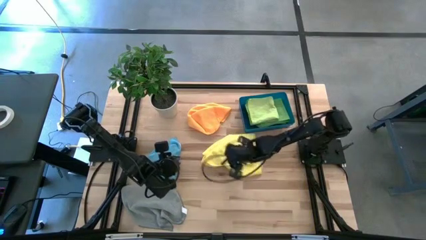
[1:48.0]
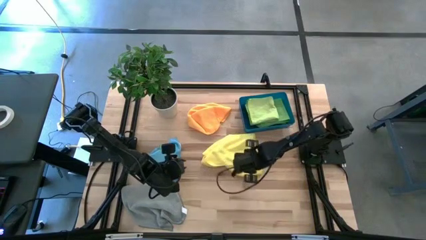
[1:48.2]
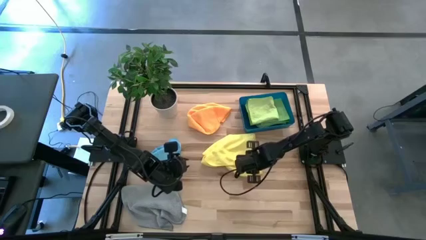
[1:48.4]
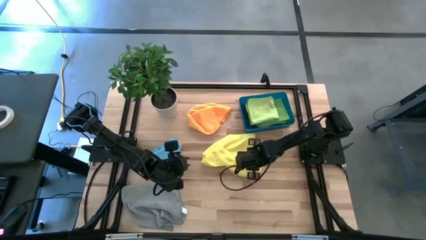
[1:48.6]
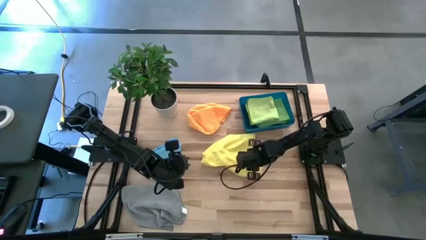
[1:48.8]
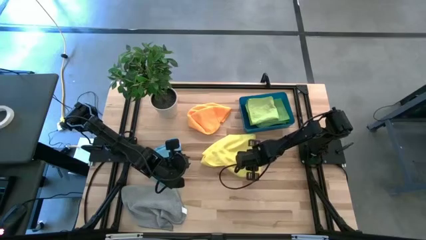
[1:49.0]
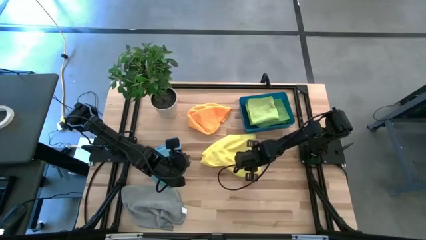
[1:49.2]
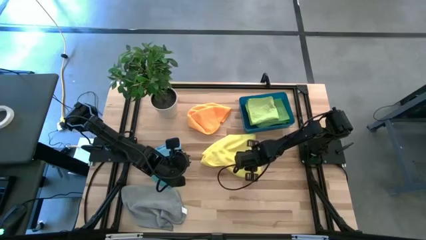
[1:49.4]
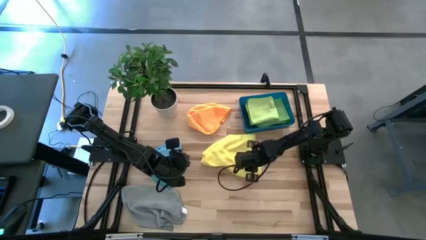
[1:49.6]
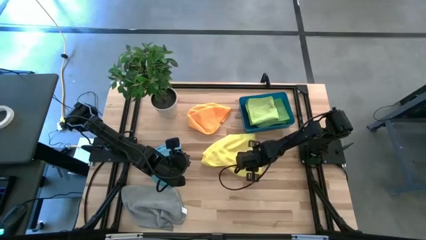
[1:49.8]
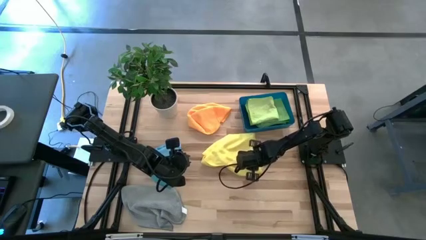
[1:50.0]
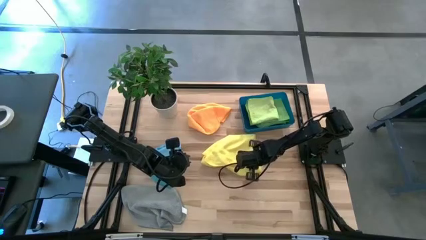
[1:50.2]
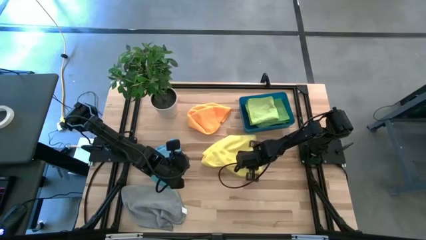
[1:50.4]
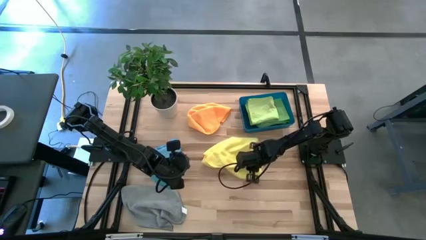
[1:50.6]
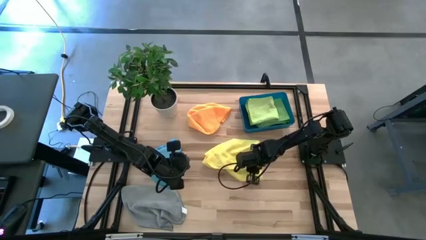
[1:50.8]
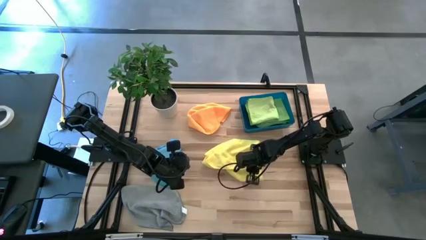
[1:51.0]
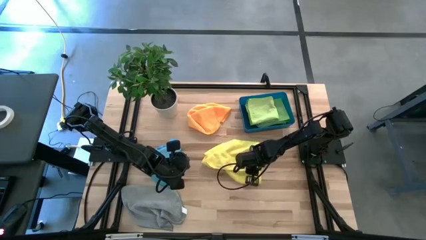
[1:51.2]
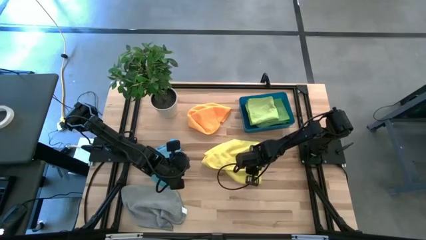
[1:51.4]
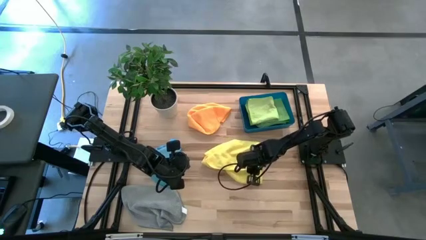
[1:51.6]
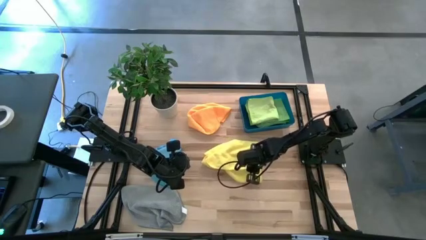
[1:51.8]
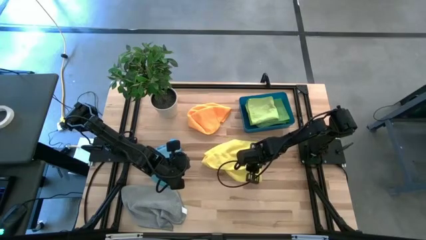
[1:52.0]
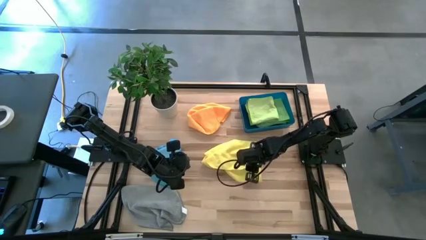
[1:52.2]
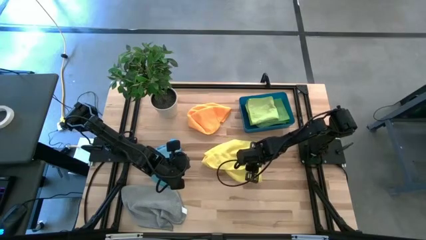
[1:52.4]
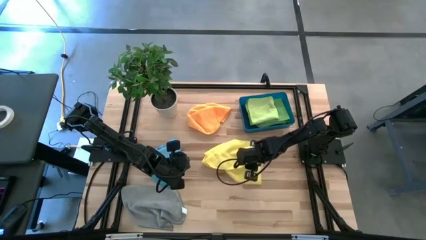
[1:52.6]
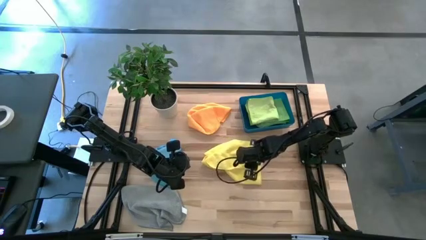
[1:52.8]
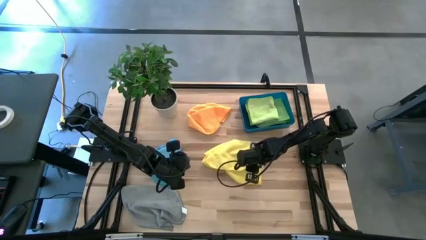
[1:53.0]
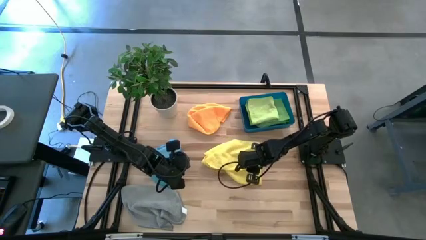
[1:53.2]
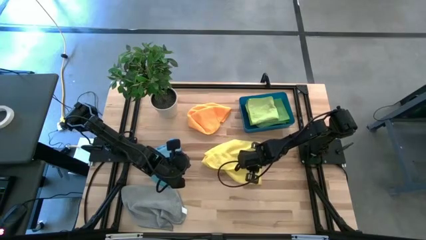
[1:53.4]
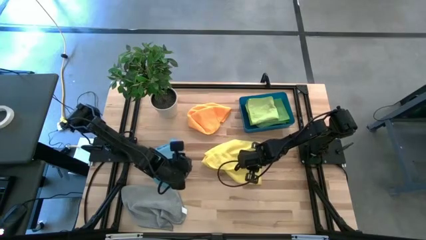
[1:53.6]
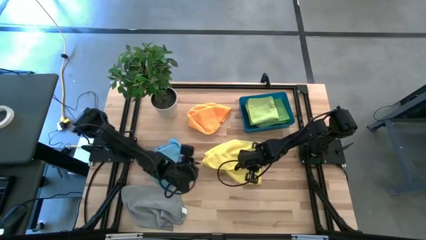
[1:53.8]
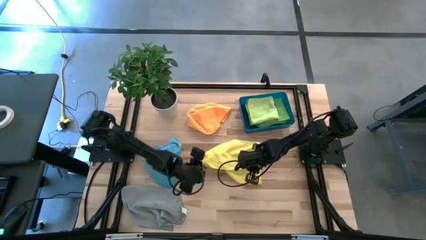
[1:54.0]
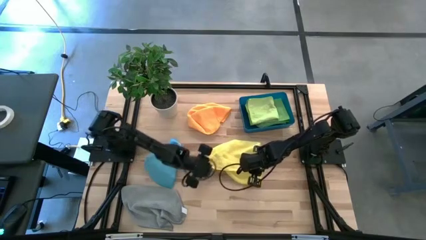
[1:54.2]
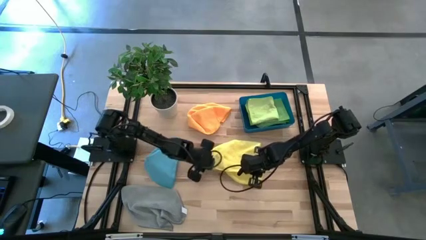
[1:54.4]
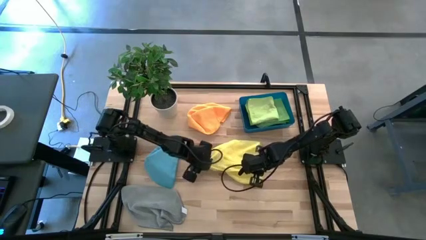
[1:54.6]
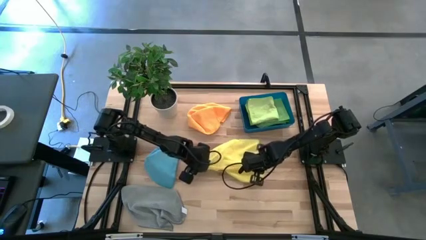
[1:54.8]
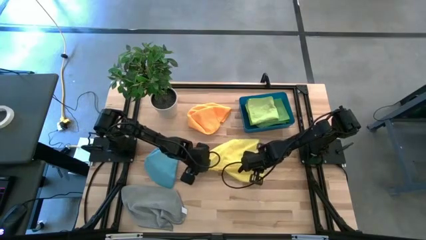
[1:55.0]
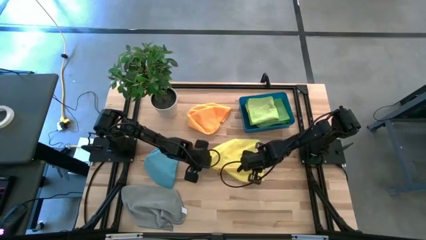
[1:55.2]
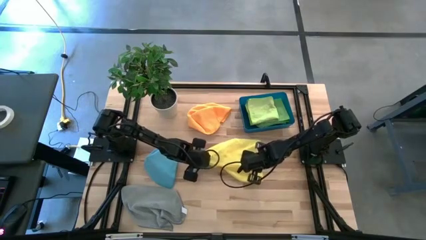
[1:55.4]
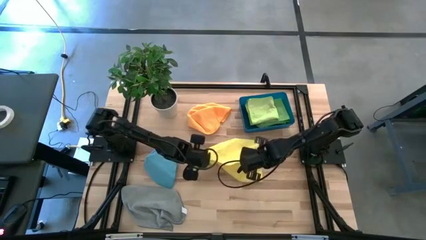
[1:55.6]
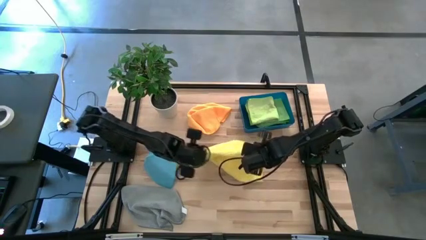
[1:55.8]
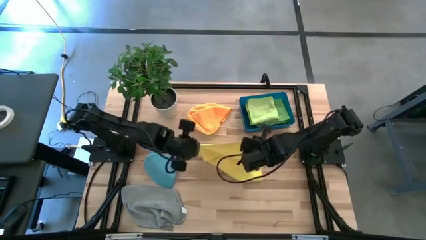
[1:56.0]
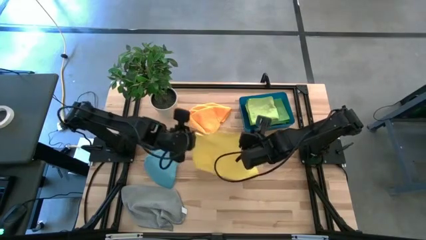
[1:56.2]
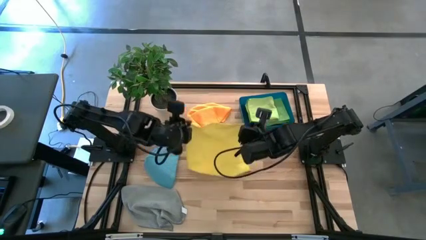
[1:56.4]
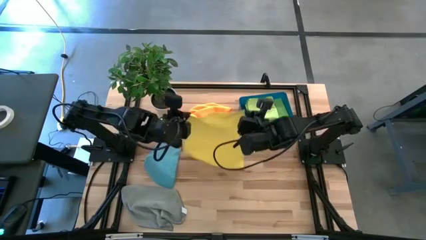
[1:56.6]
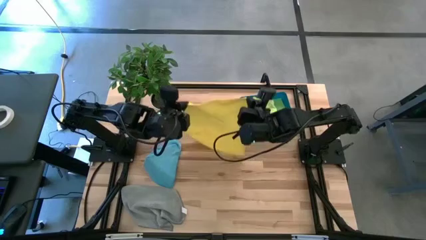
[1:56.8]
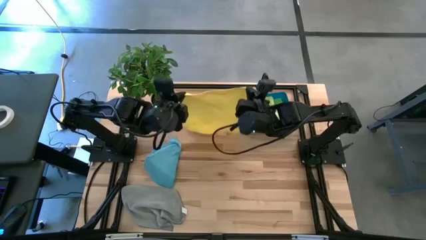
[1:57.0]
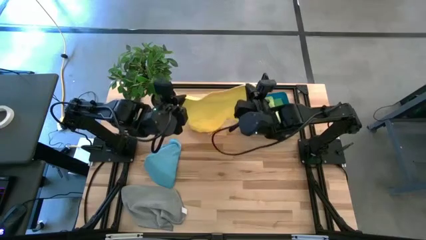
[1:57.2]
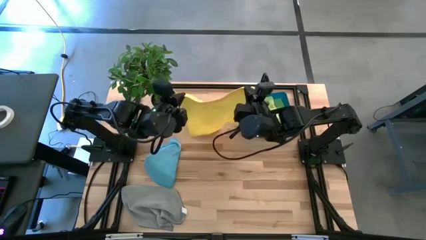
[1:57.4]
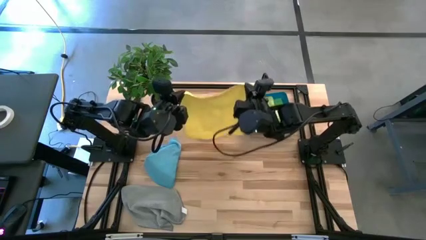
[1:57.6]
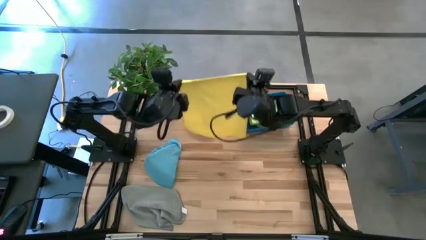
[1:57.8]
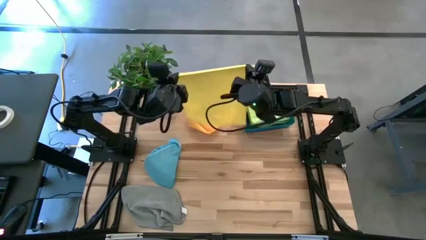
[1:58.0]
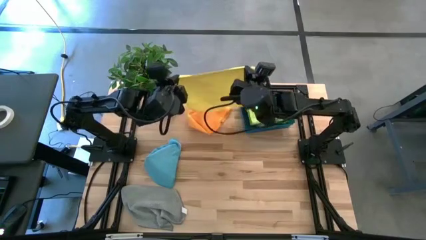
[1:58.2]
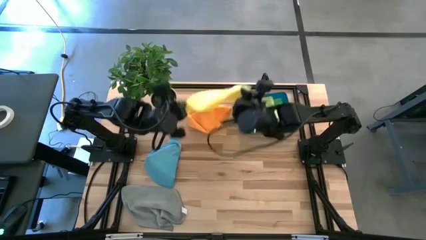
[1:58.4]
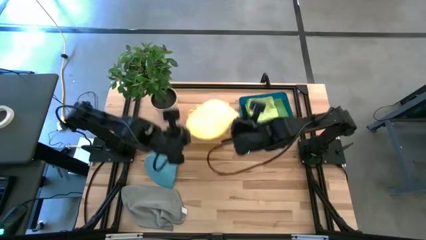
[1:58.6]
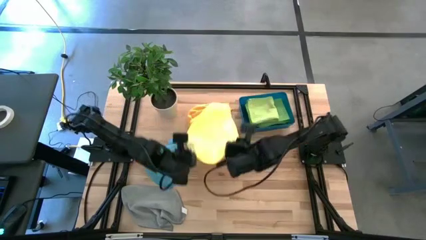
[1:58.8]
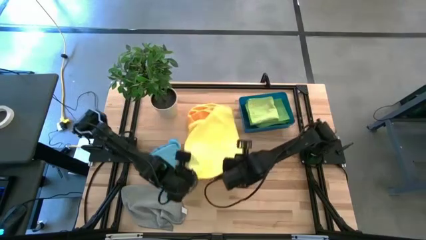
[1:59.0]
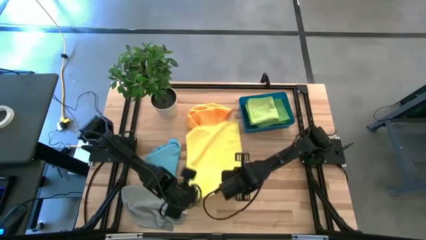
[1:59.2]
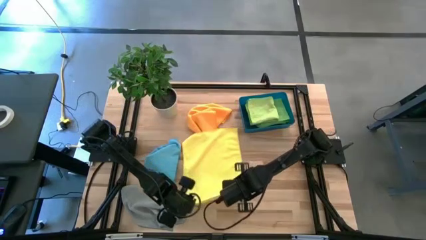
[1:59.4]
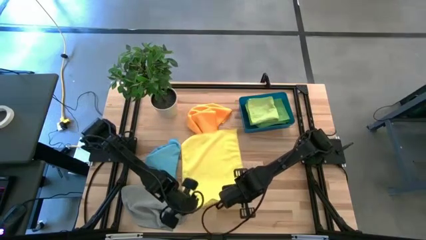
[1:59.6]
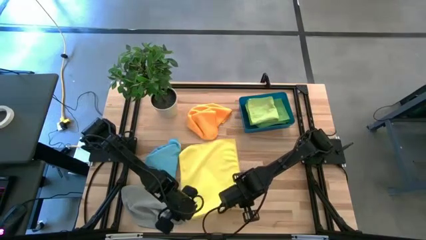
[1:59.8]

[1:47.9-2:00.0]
Task: Fold microfiber towels
Fold the yellow microfiber cloth

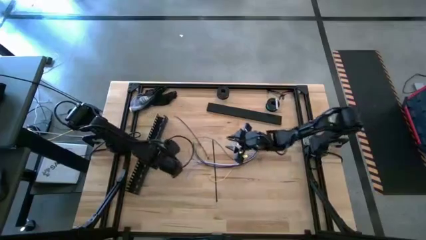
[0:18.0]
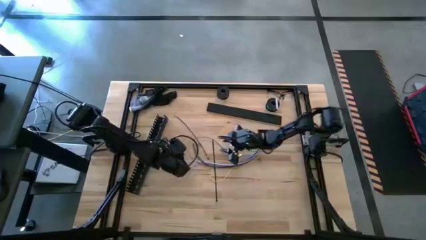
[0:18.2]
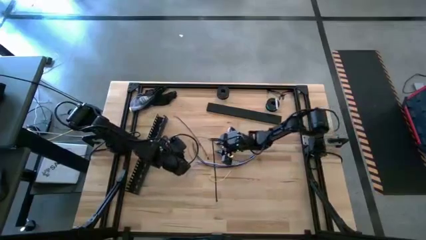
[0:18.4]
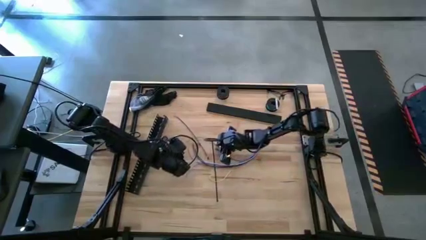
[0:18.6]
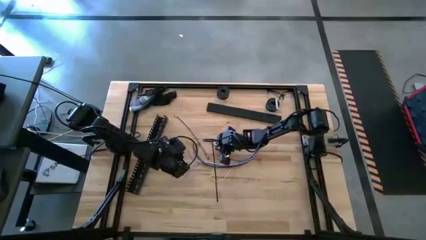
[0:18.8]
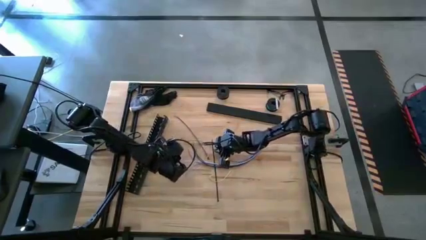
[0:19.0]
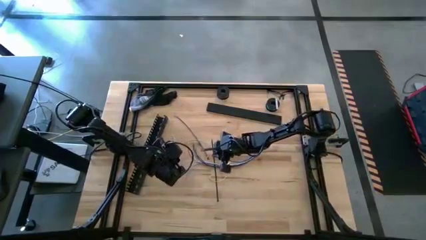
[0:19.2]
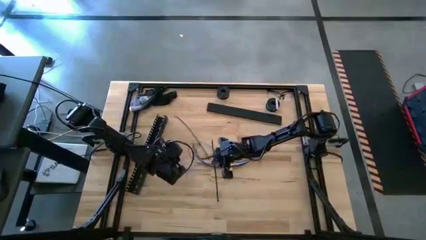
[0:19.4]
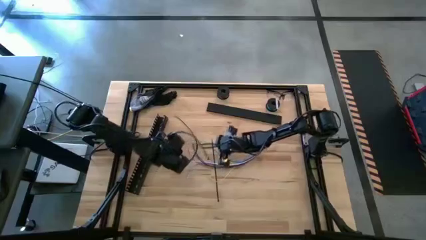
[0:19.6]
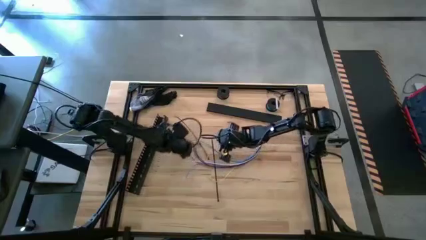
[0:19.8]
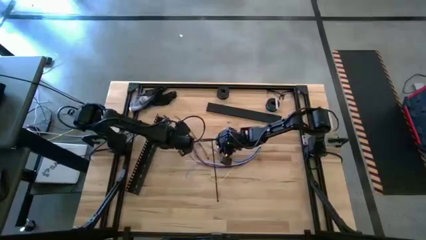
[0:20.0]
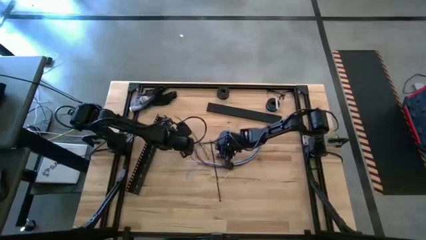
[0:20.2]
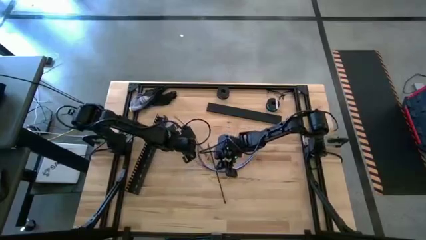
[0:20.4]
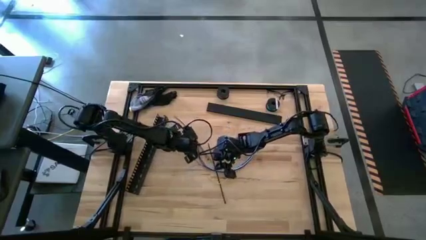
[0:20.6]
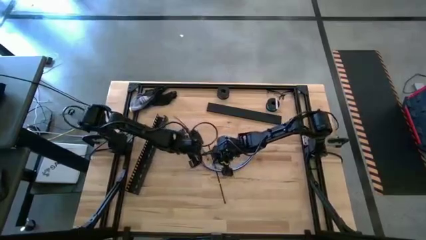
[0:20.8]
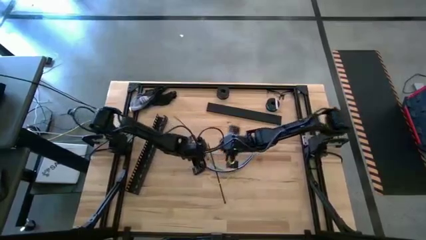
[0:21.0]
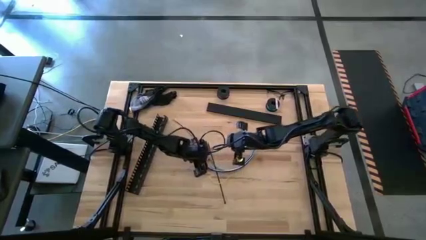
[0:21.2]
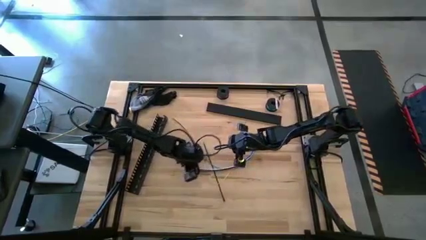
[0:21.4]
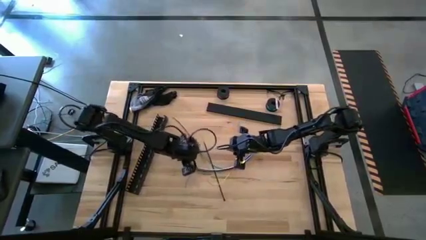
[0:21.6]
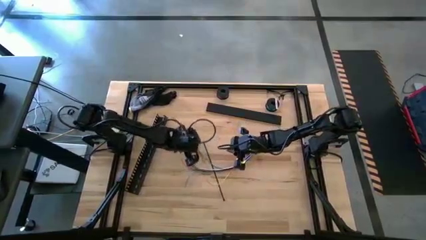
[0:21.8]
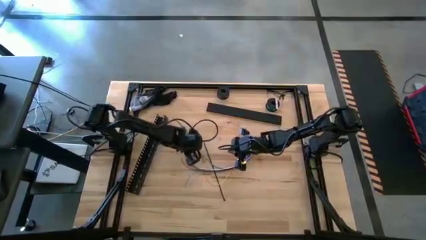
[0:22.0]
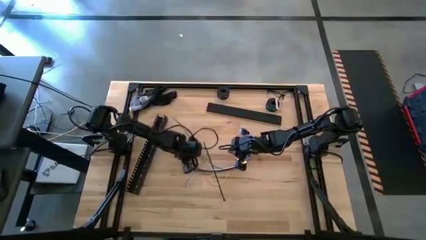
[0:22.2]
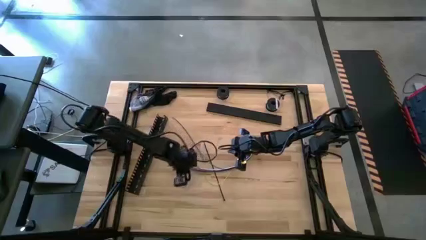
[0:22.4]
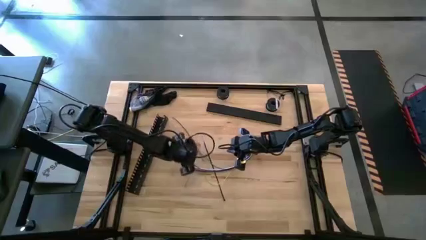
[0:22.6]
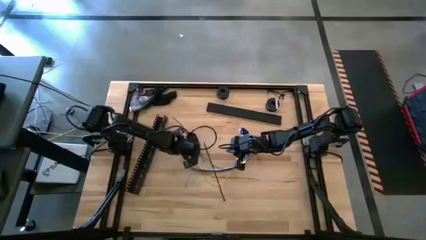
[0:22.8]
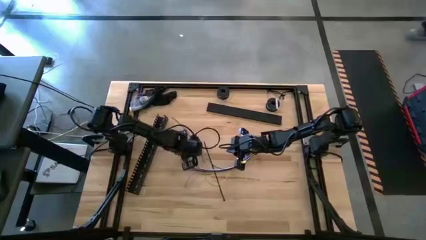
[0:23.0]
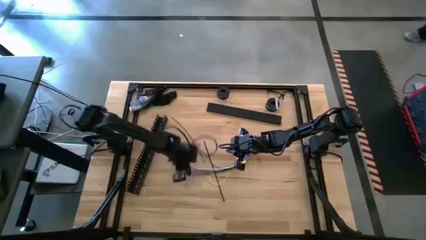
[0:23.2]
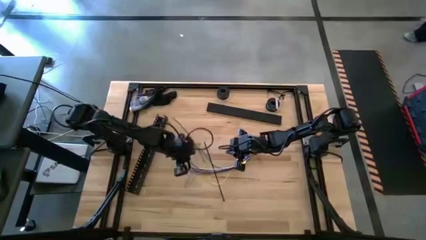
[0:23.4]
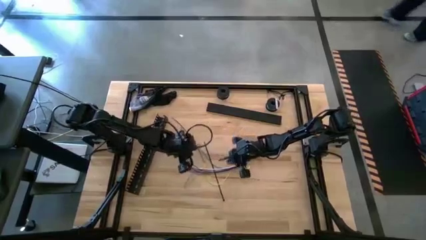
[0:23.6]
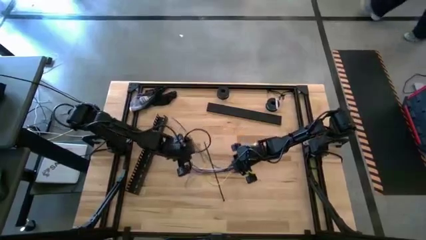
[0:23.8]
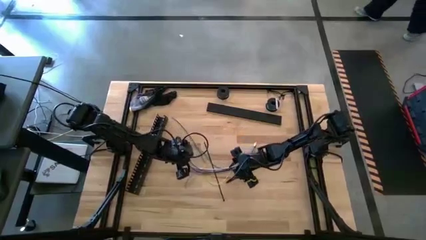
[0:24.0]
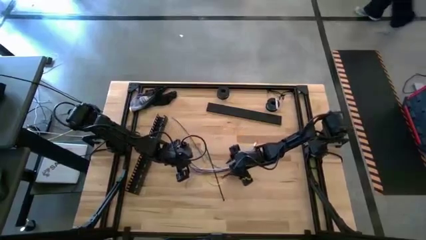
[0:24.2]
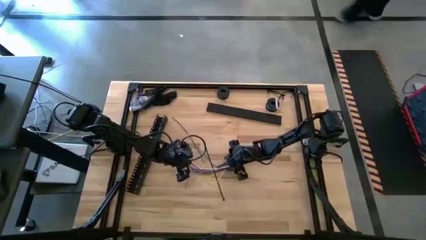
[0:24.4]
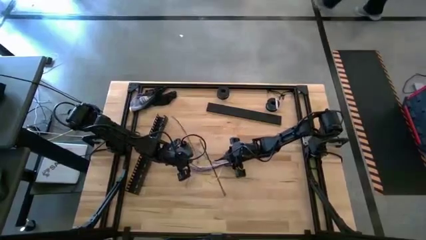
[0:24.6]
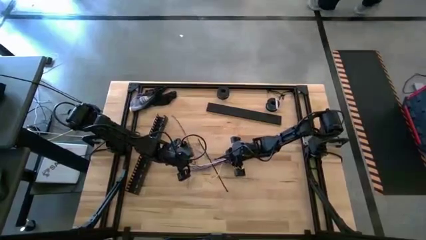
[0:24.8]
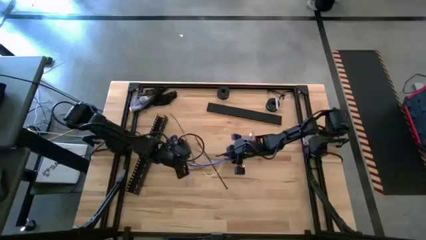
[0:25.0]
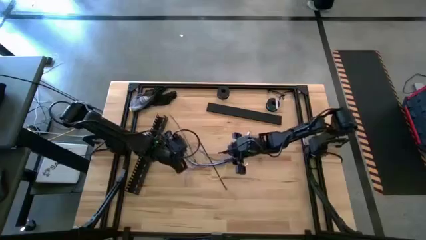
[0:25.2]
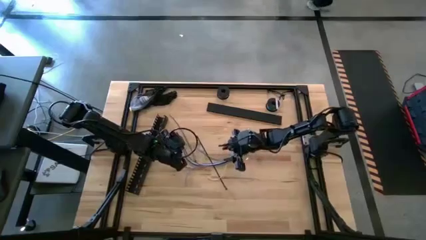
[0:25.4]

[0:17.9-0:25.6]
Task: Ziptie cables
Adjust the cable wires
